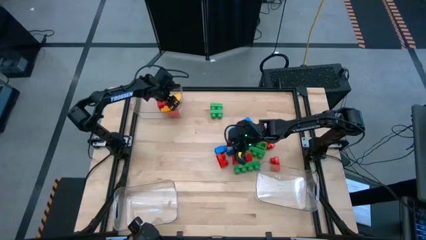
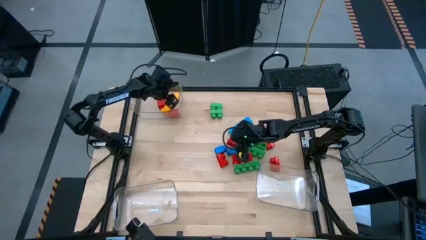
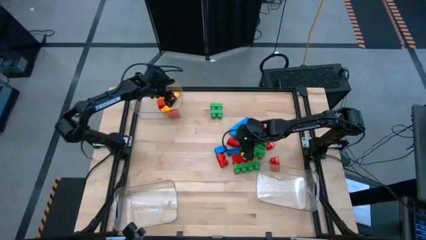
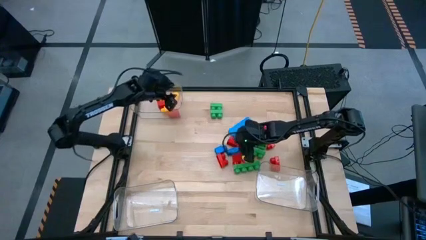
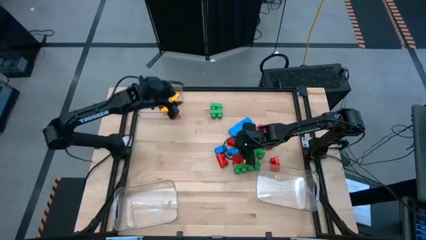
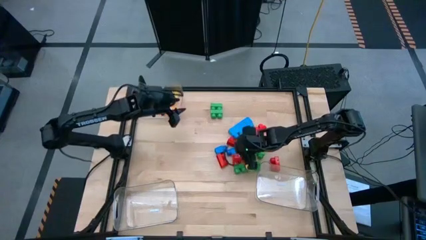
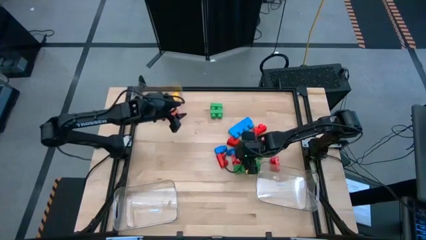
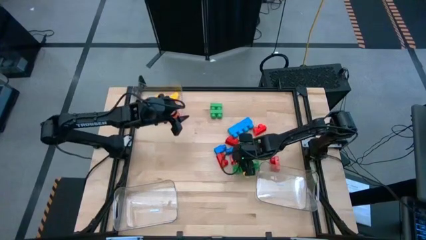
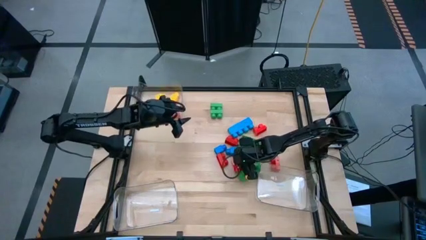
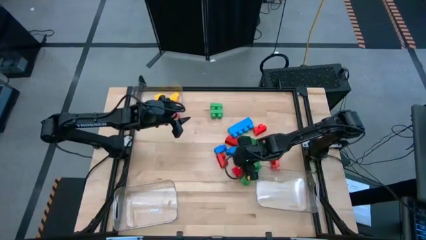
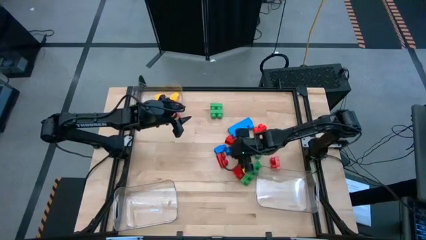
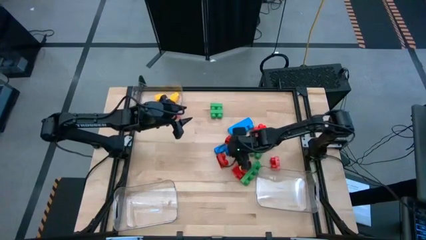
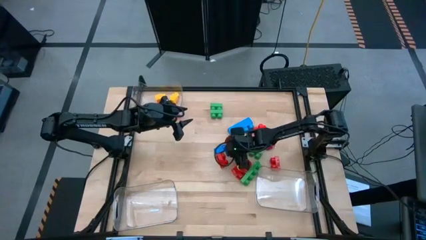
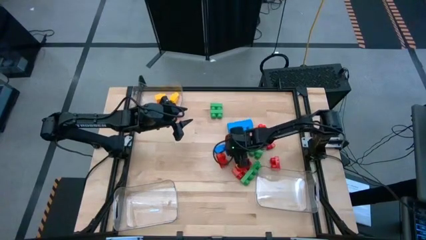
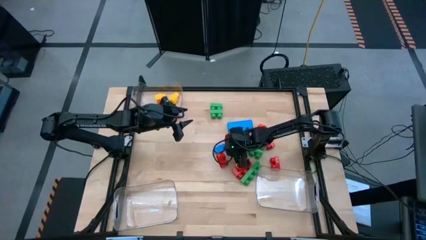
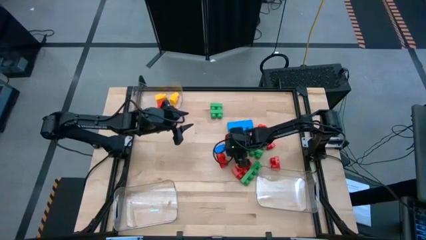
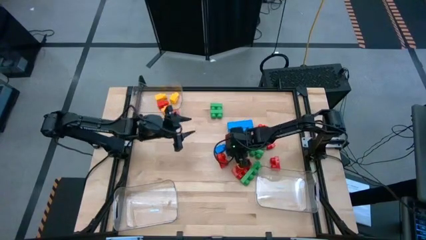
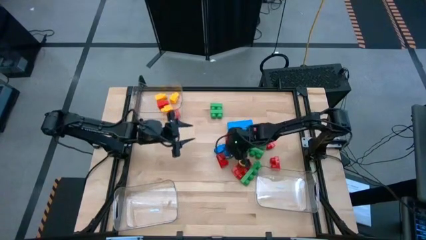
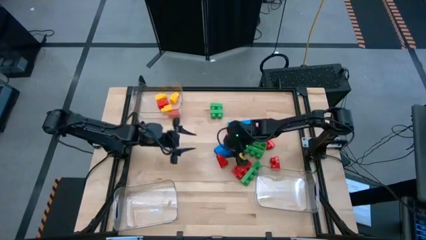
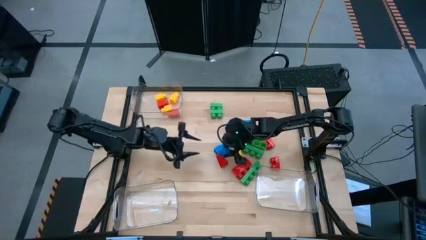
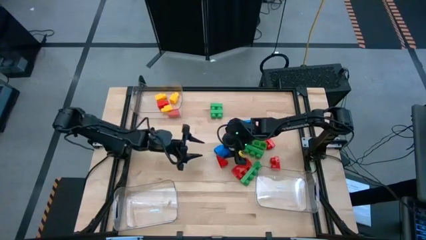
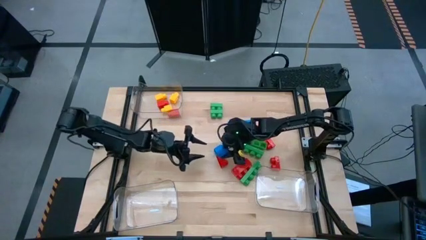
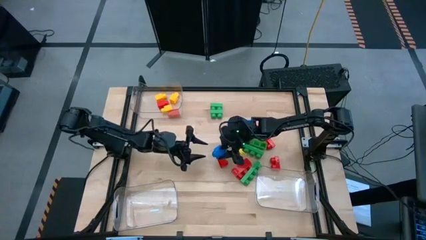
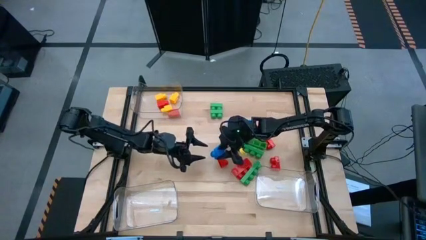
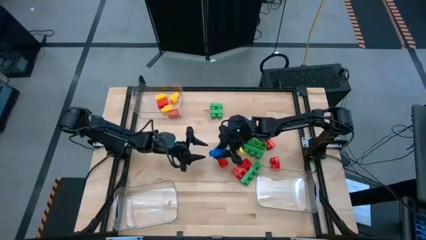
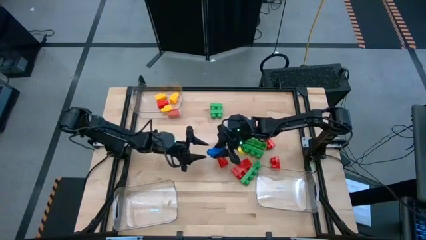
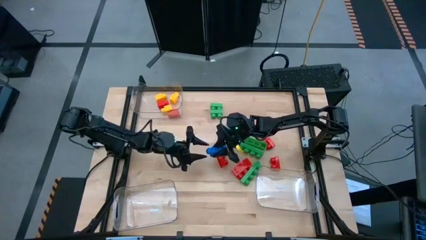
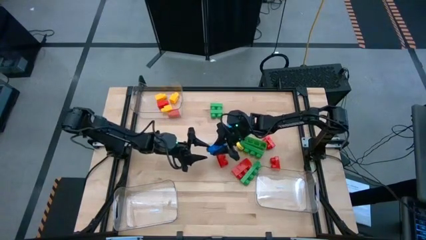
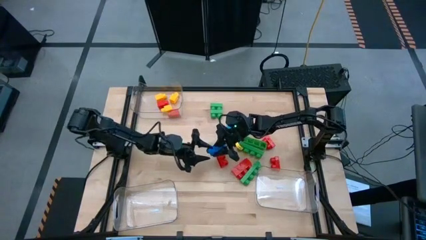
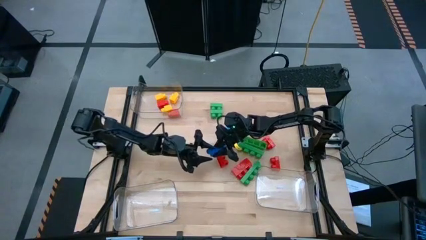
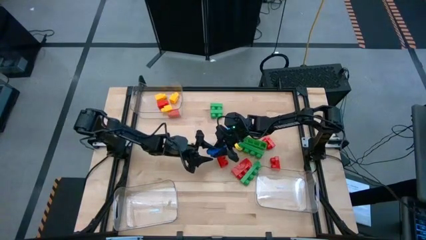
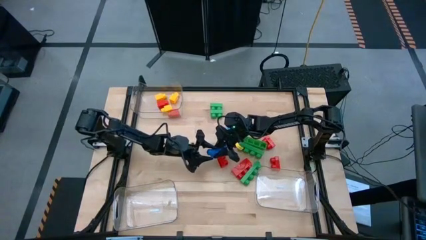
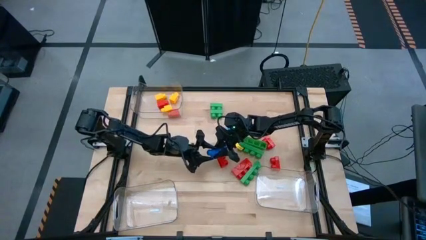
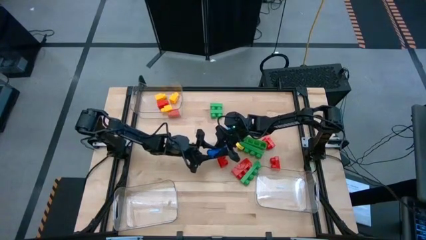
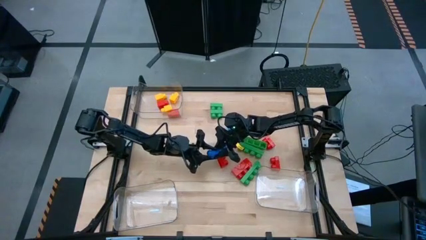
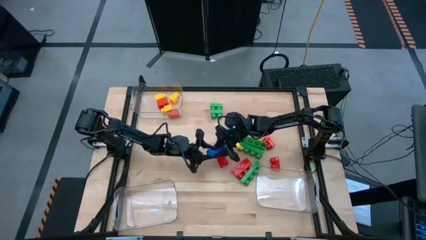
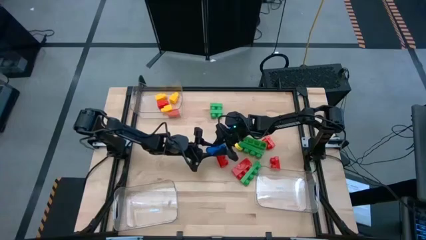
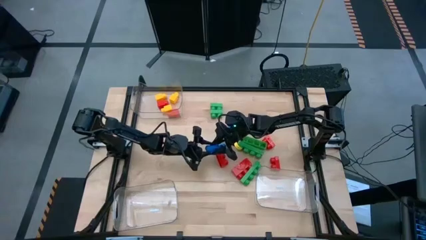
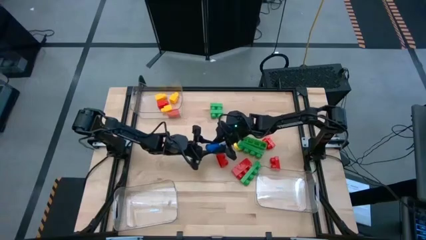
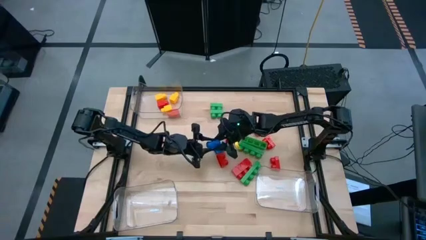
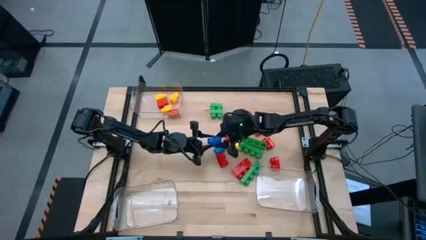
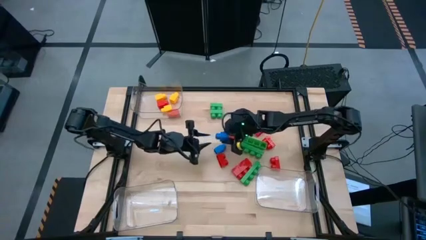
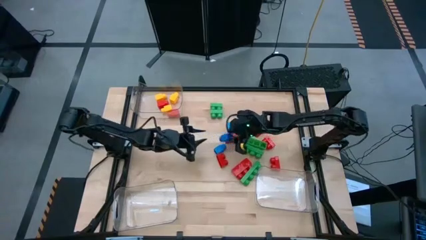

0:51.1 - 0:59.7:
Task: Sort blocks by size
Put the one-stud blue game piece into the top transparent bin

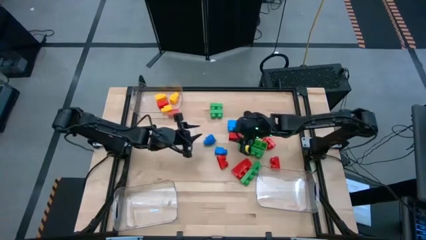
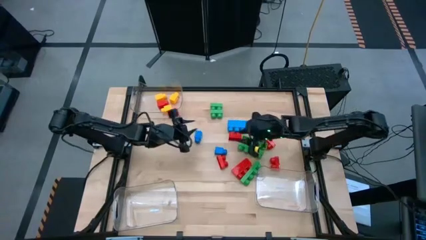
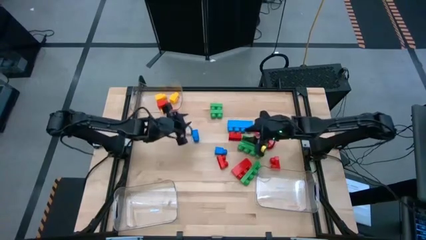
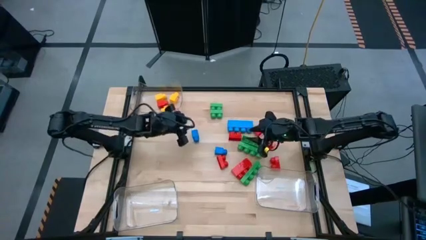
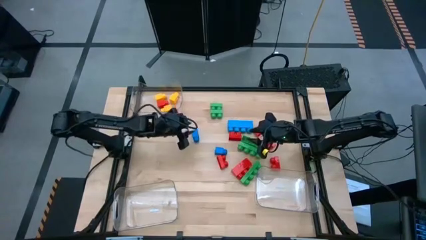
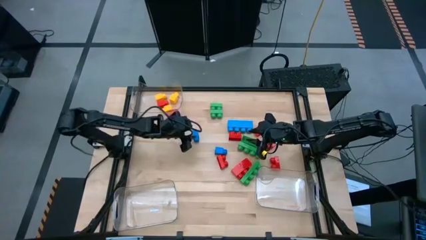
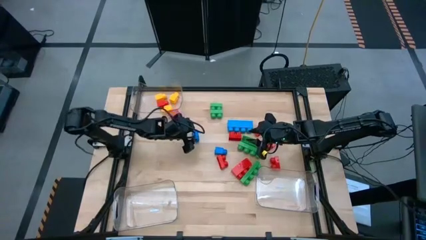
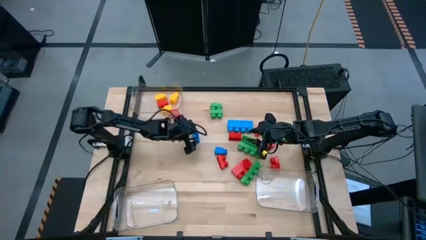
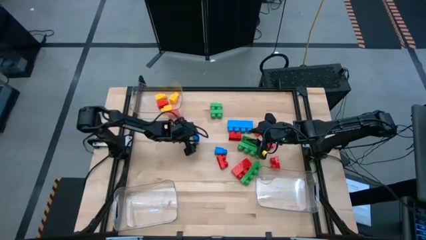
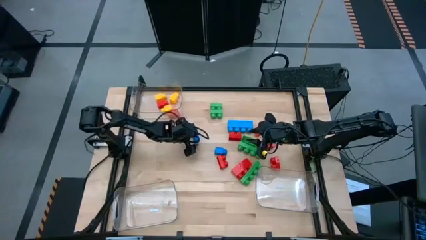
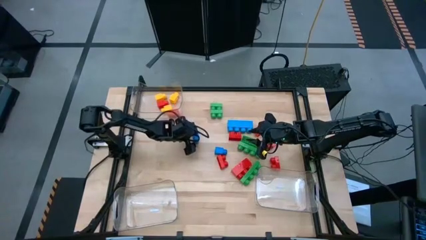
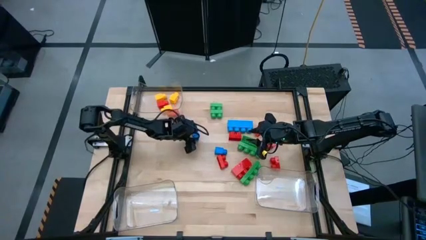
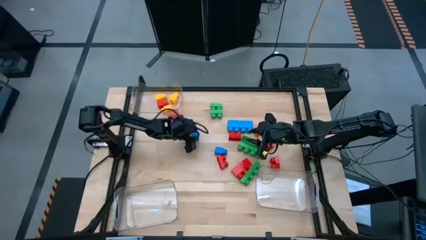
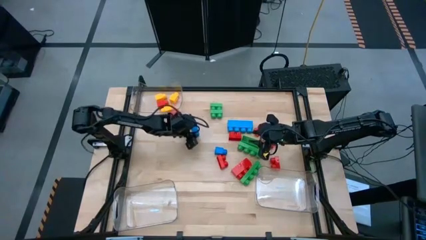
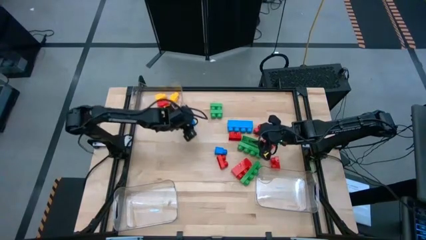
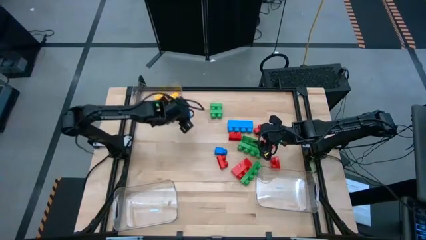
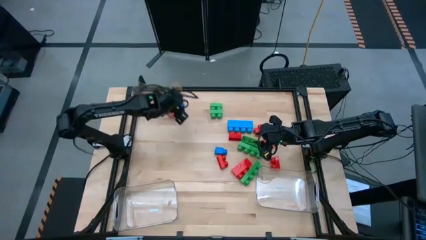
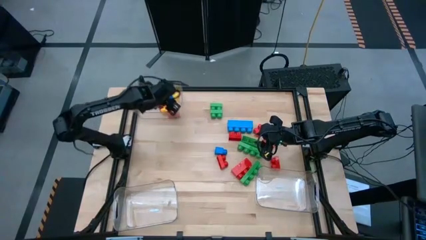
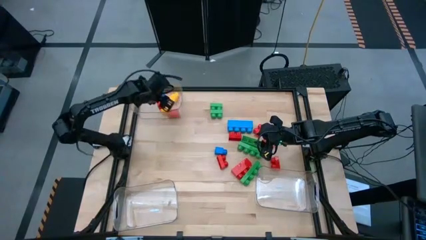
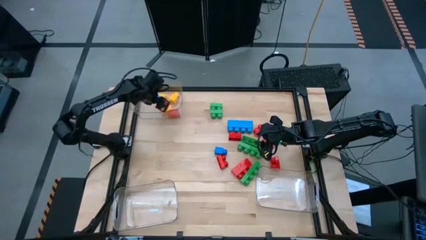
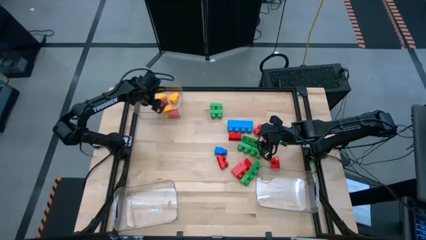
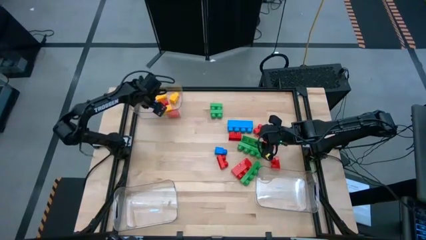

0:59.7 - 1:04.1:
Put the one-stud blue game piece into the top transparent bin

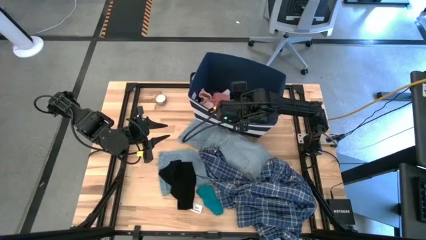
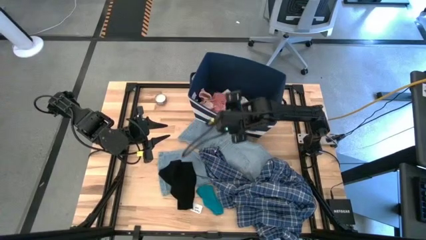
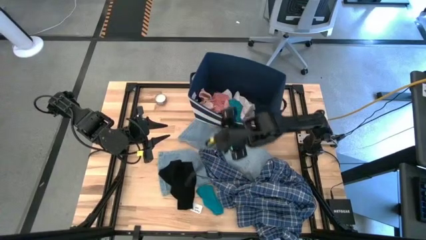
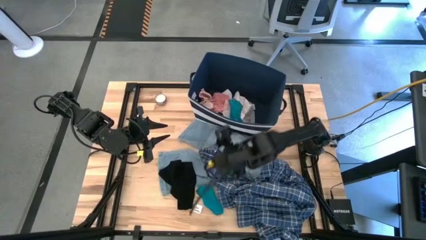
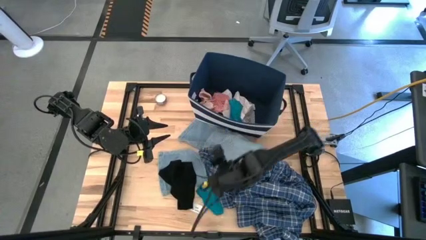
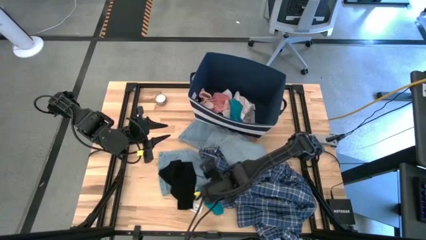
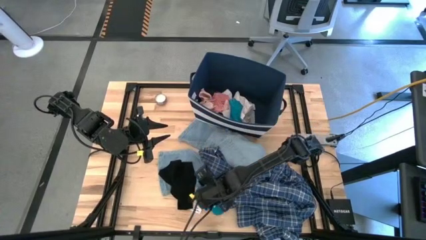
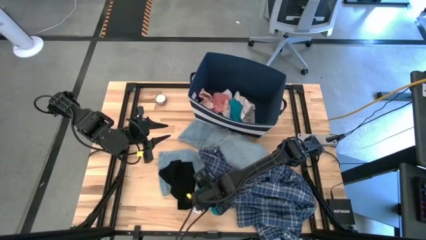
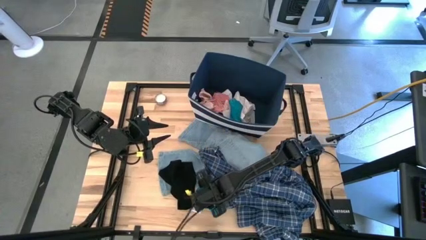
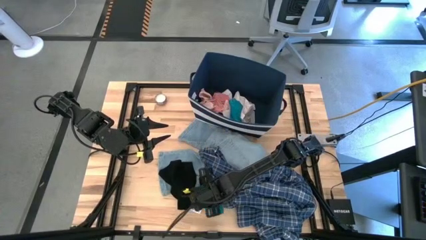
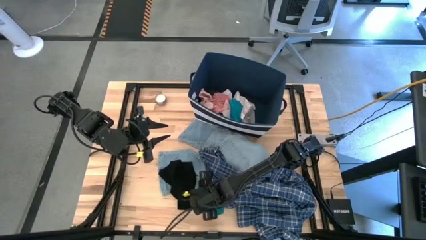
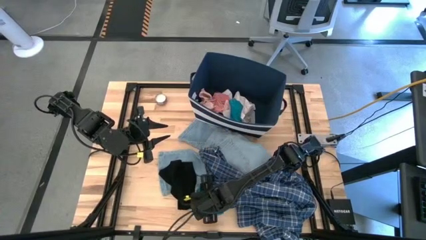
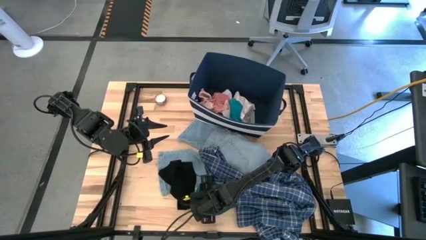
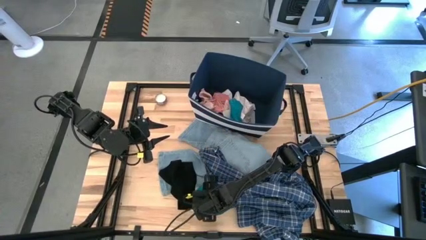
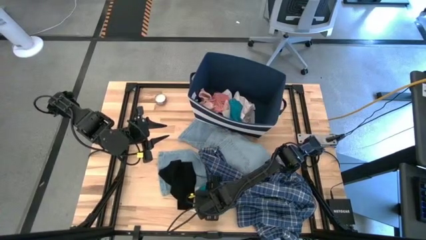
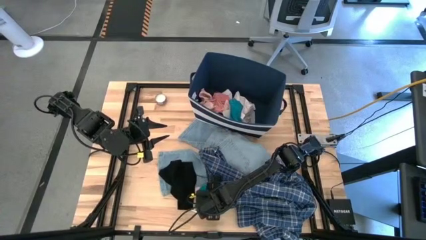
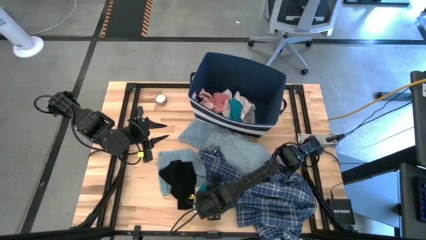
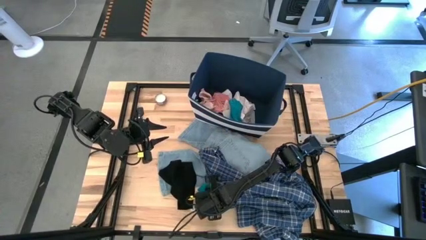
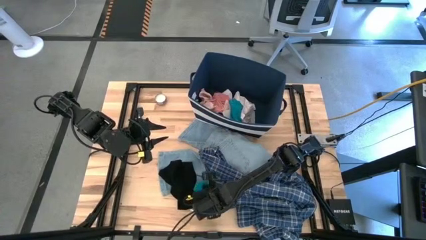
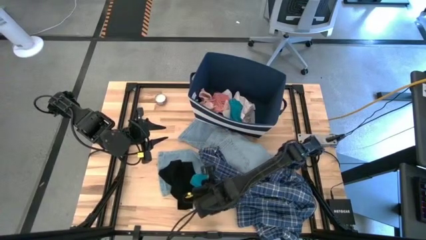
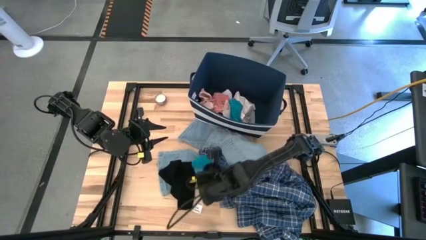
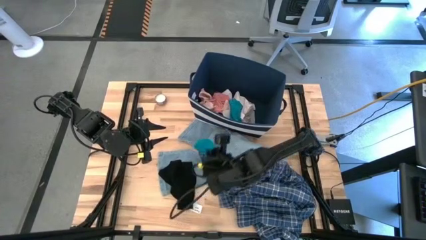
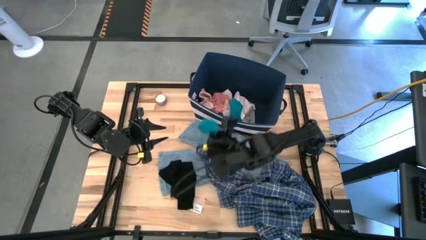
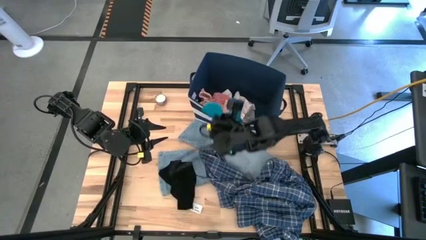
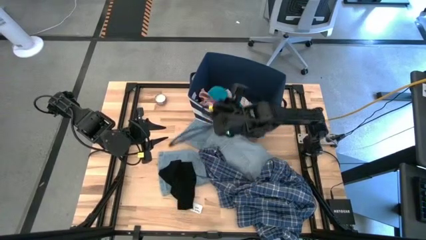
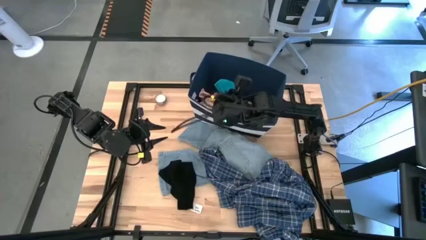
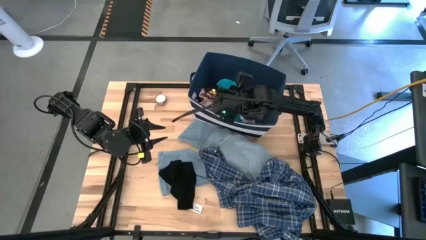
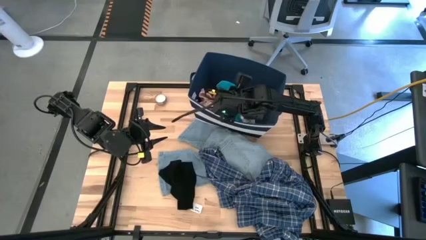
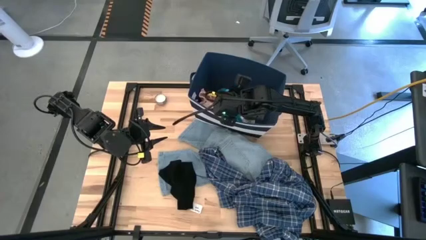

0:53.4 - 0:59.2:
Task: Sort clothes
Put the blue sock into the blue laundry organizer
